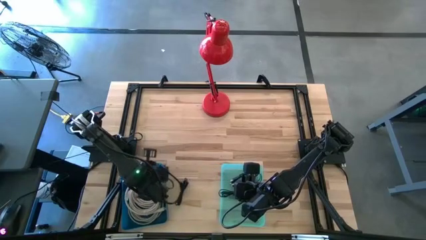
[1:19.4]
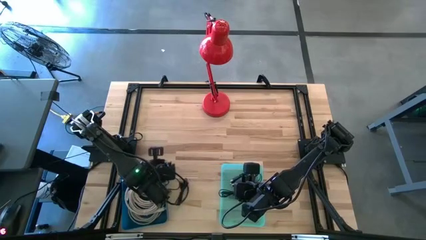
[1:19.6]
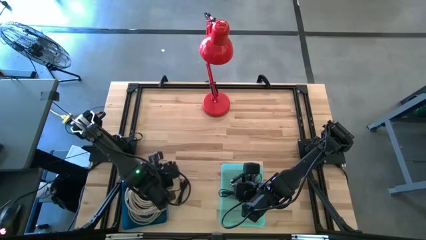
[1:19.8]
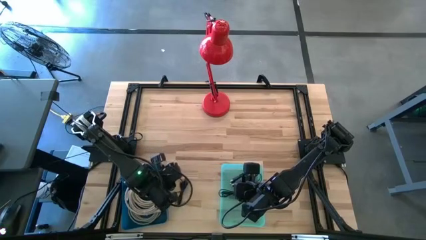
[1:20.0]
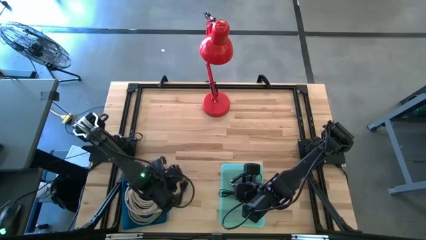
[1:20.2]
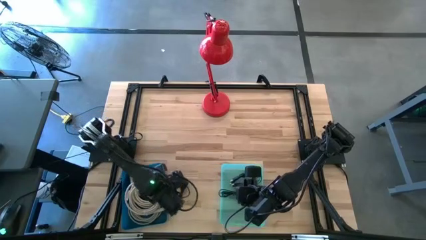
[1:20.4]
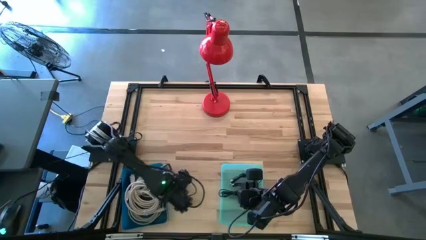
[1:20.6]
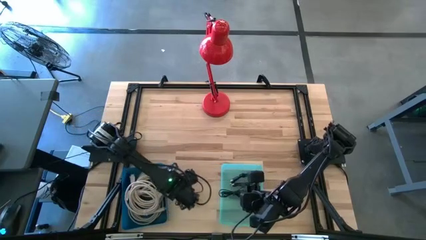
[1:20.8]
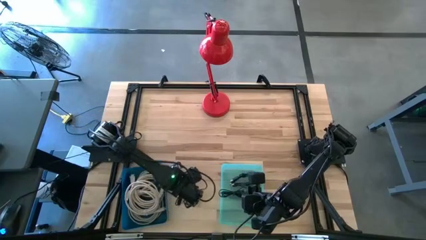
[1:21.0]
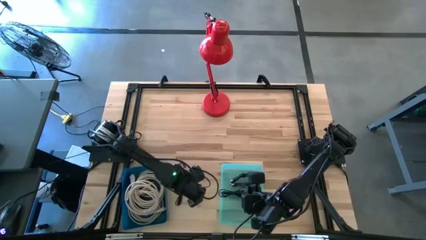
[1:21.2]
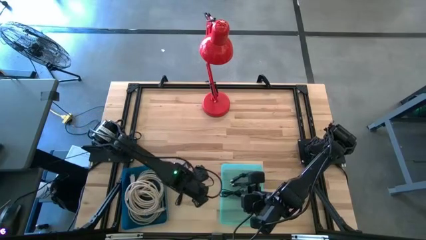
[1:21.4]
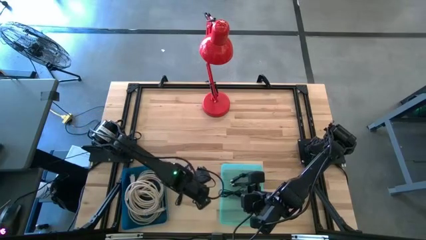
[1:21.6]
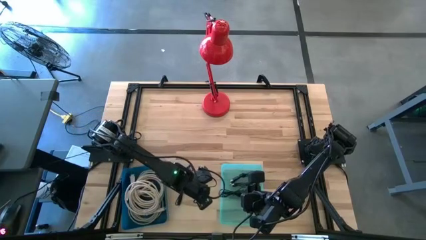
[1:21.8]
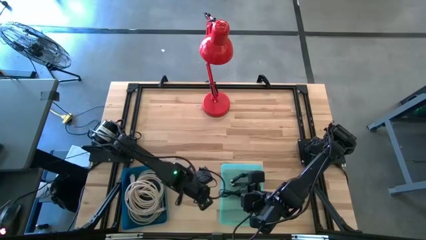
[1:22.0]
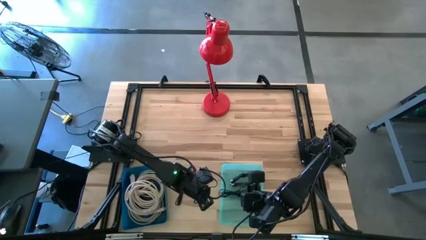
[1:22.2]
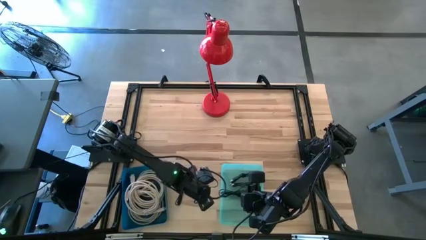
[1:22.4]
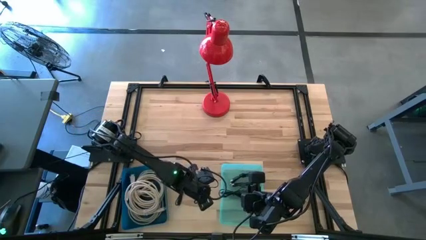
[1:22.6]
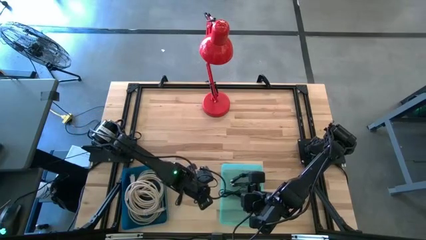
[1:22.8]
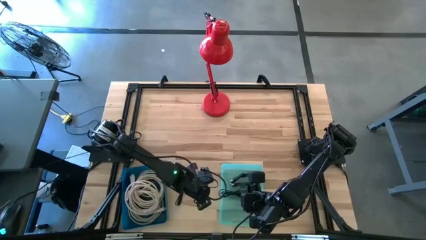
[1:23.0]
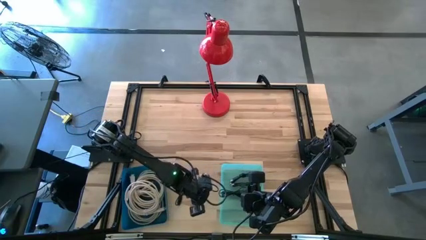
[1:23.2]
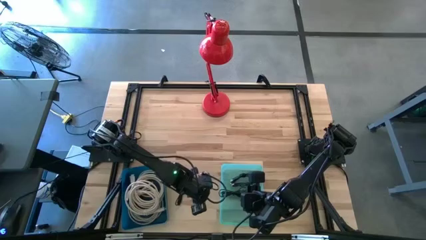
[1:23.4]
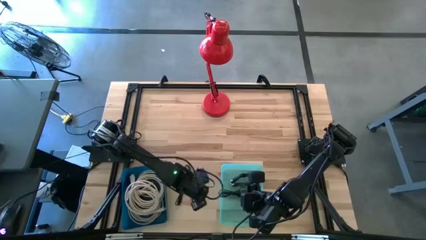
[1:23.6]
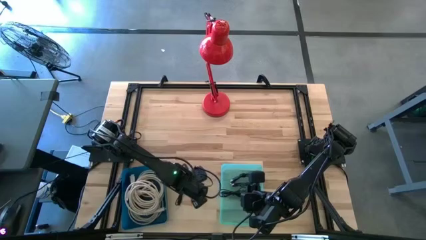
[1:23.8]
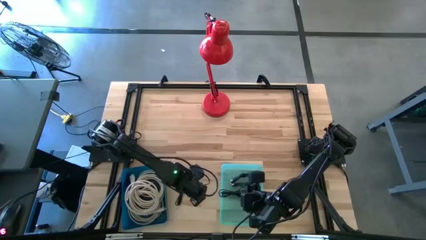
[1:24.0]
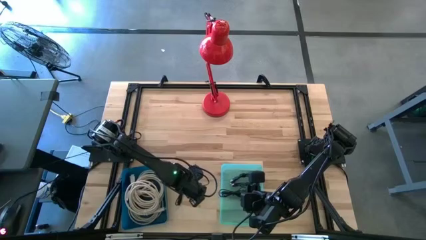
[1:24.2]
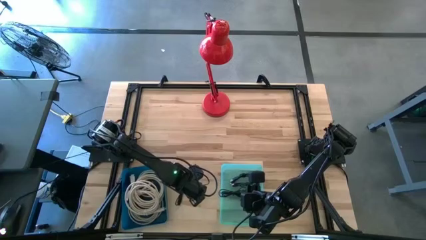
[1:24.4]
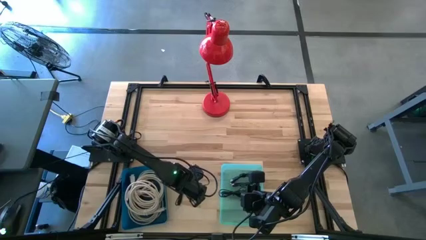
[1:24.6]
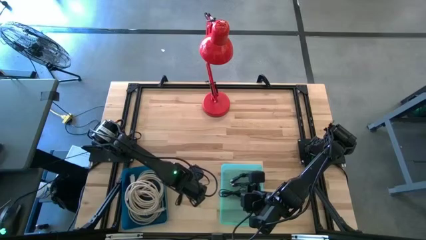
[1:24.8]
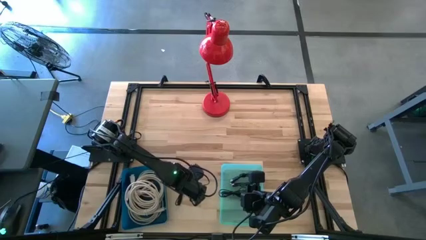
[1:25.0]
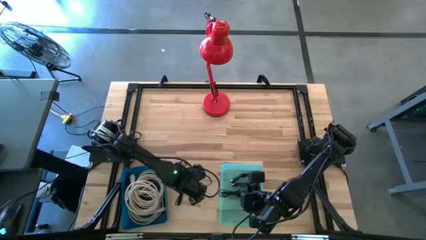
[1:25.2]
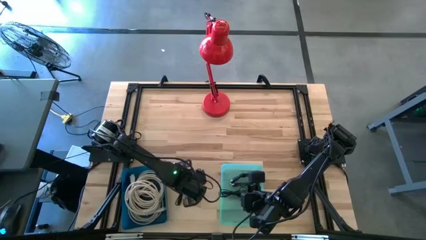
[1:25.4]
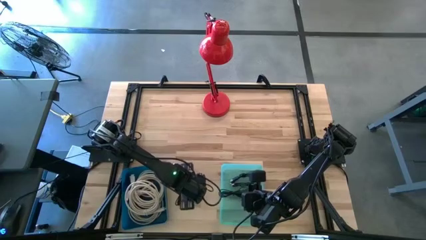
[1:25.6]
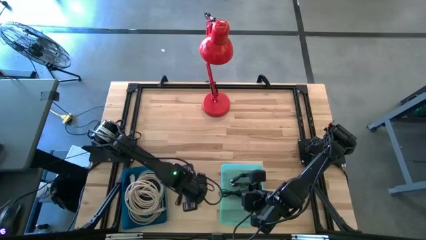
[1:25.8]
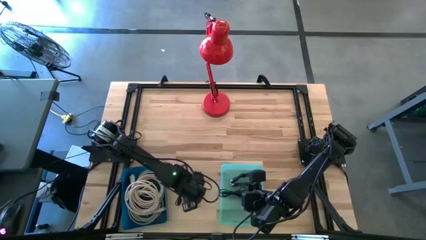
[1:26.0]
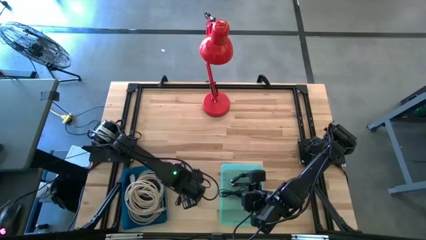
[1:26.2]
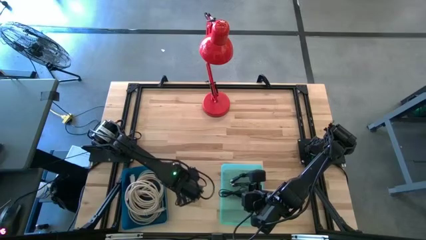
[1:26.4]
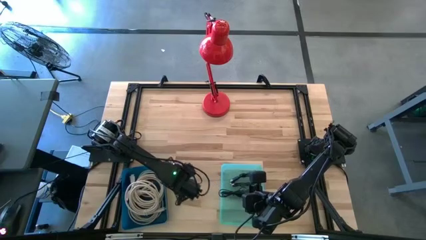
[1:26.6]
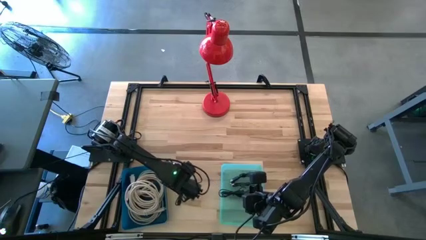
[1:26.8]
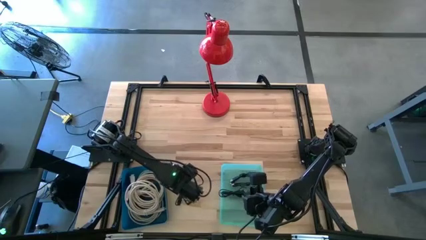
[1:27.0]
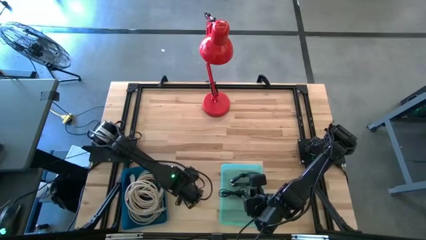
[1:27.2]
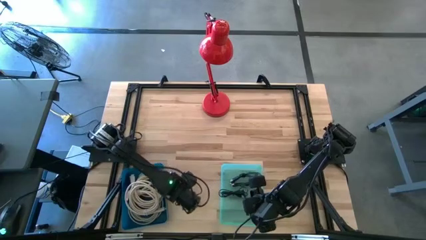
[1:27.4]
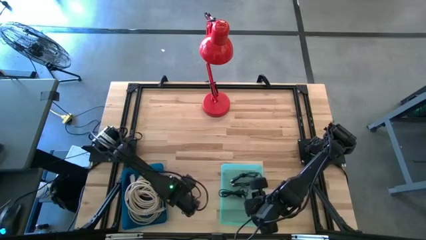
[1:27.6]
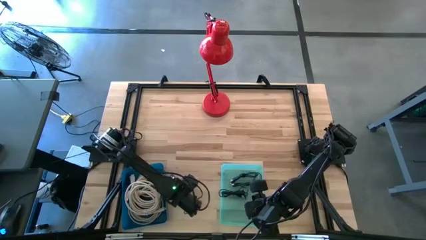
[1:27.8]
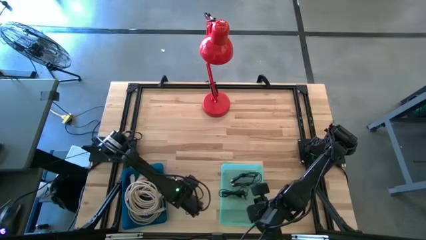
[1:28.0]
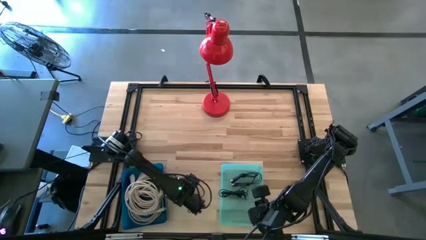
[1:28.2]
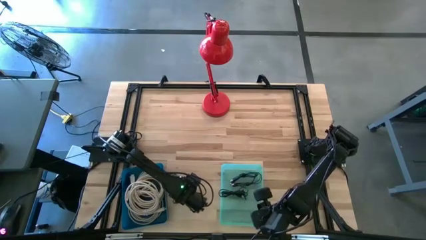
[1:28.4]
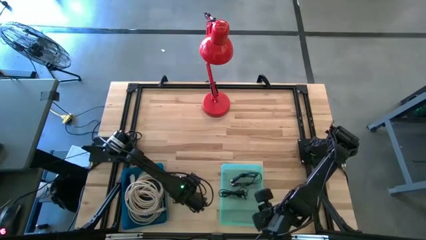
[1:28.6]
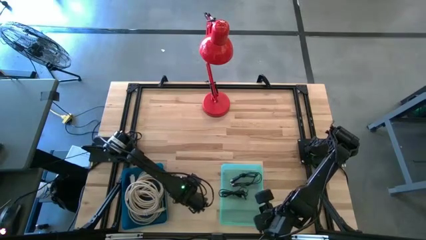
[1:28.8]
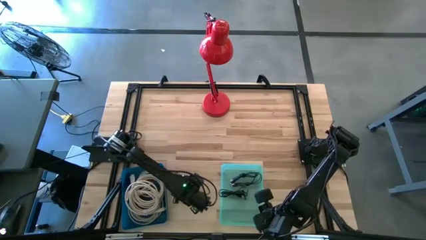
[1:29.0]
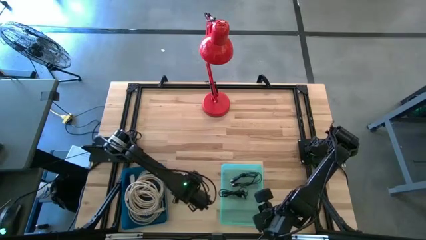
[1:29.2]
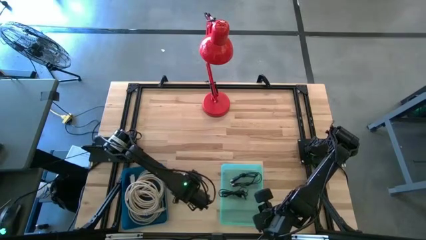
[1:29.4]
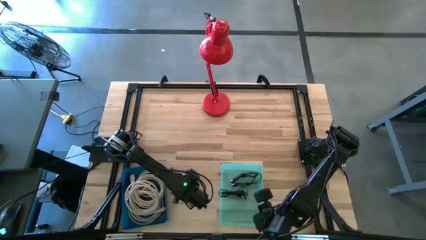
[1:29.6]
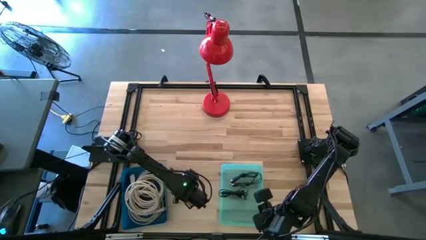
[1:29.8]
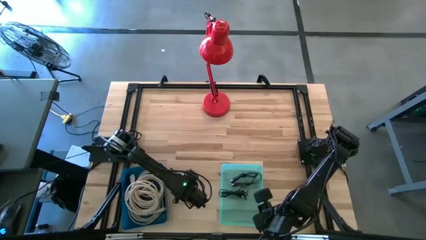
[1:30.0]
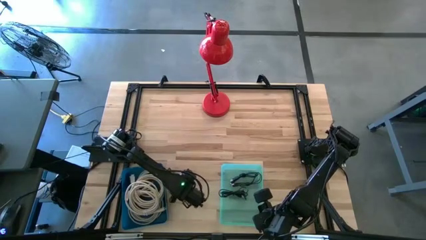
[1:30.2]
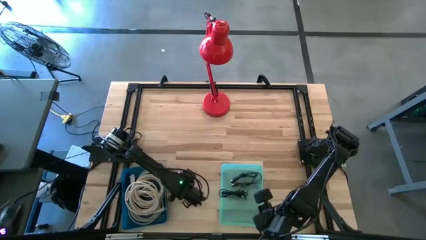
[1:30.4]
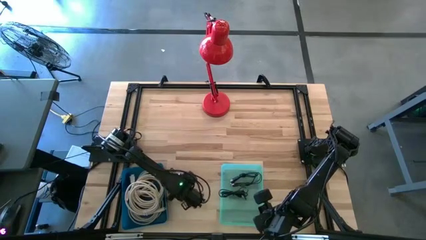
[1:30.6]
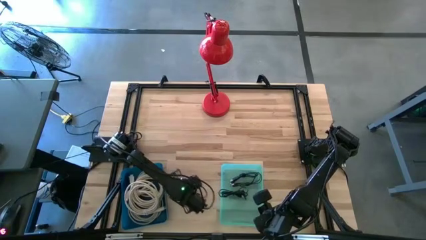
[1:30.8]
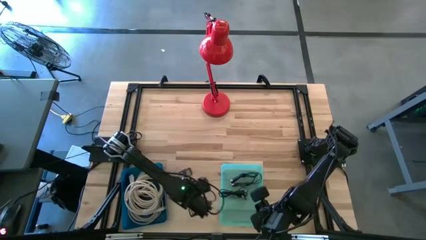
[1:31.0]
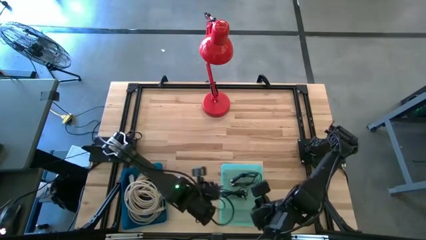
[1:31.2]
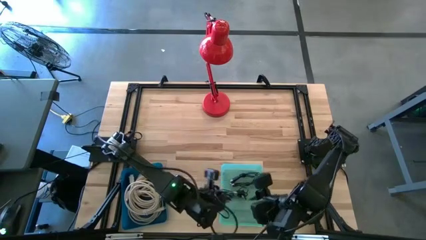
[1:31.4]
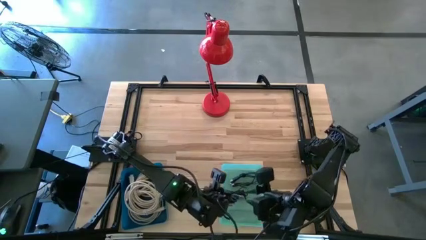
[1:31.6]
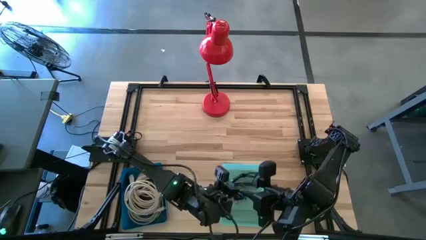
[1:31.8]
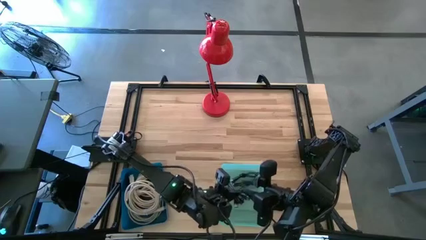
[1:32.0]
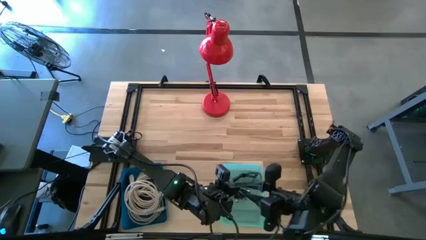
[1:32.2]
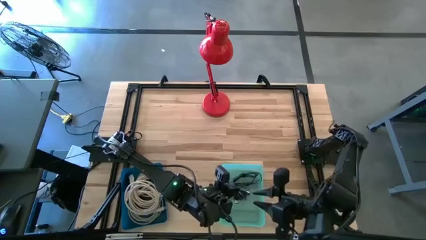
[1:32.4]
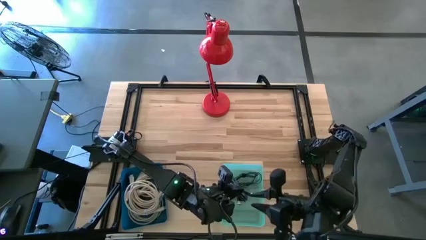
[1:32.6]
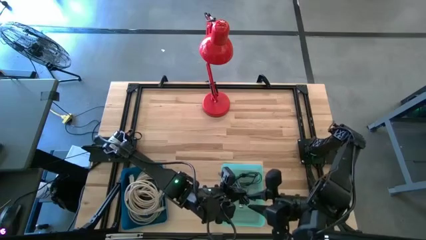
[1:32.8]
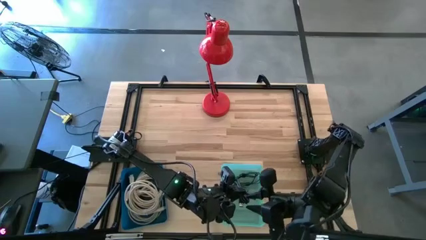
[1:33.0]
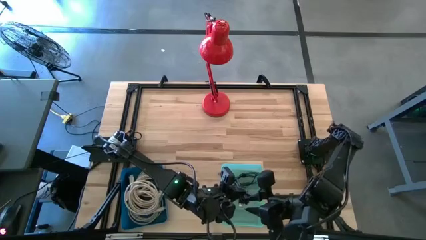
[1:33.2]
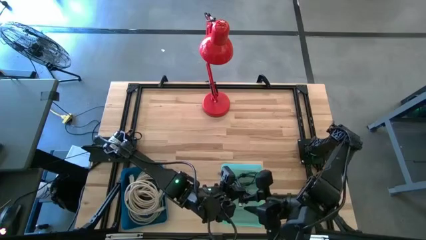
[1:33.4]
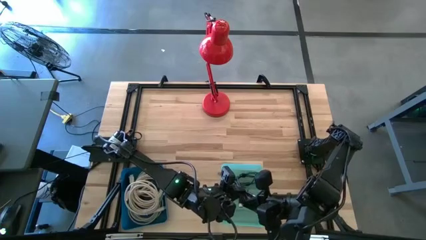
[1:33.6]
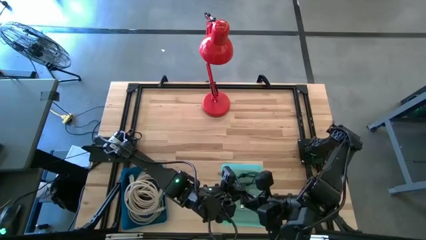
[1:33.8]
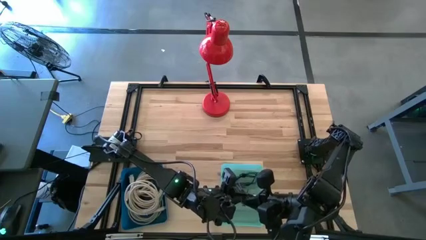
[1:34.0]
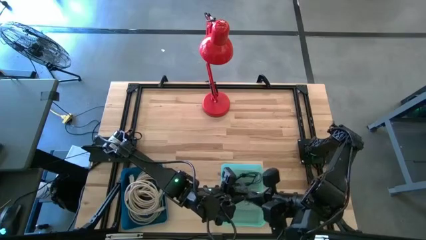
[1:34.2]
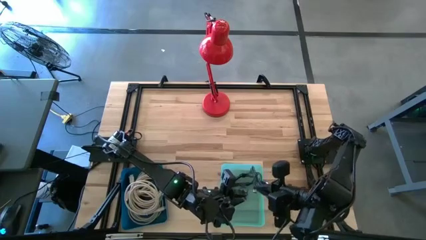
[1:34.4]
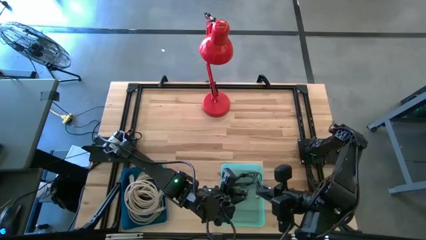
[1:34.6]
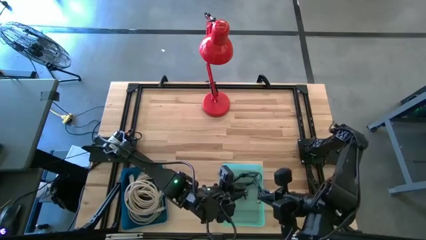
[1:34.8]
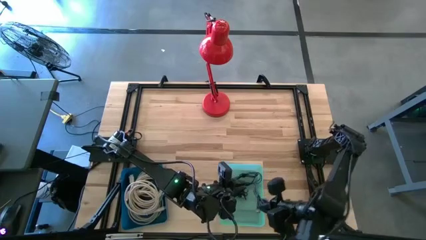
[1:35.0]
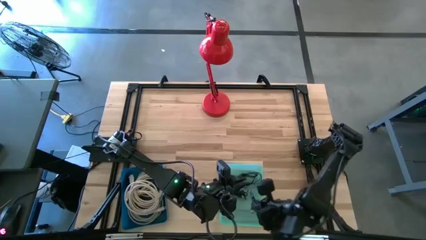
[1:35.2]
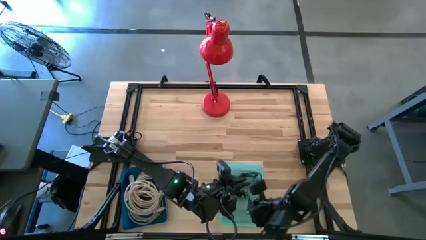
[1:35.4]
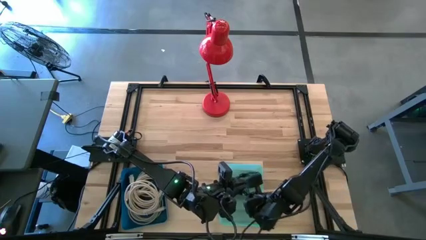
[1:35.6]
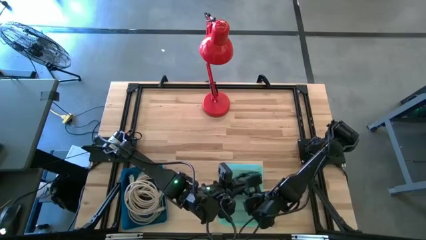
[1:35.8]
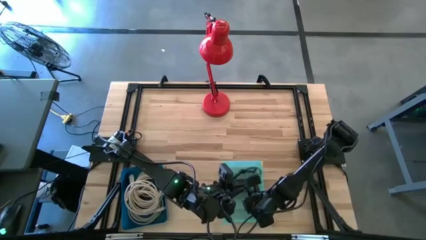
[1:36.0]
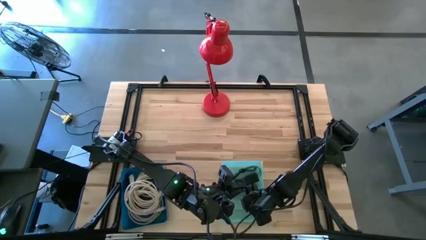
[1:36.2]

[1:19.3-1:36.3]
Task: Pick & Place USB Port
Put the black USB cable into the green bin
